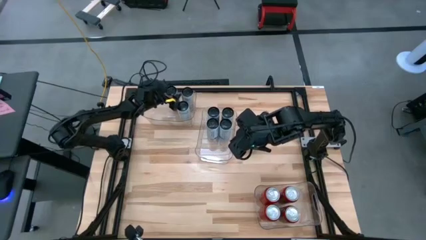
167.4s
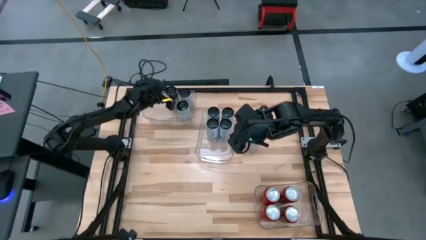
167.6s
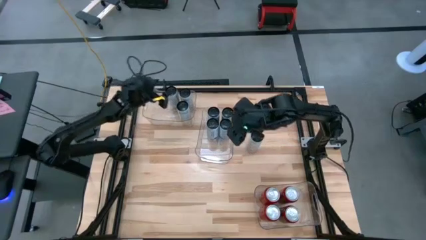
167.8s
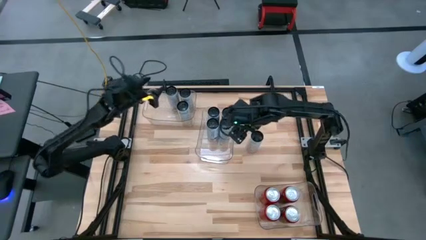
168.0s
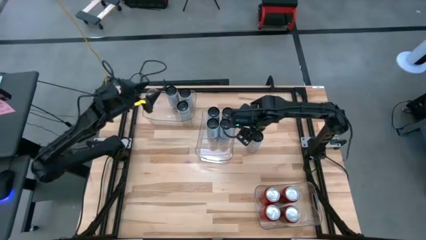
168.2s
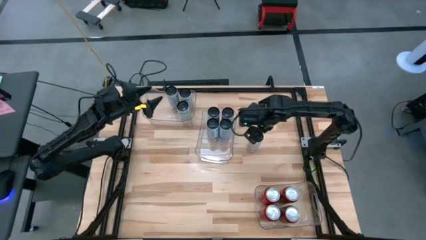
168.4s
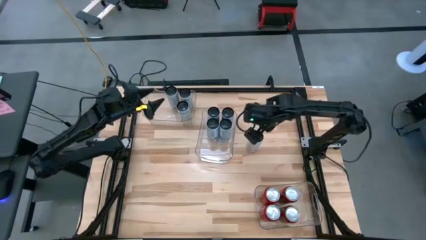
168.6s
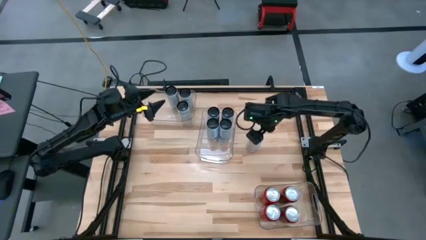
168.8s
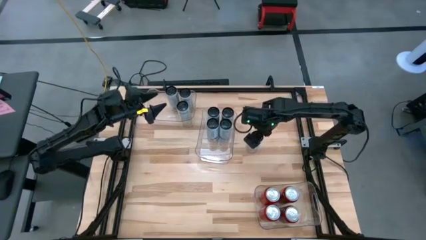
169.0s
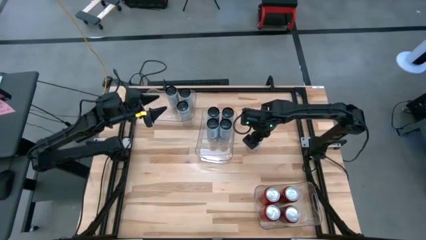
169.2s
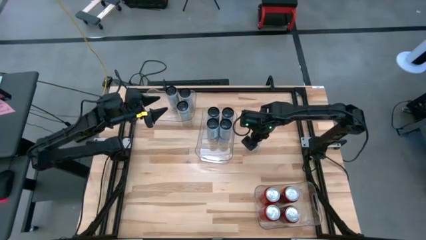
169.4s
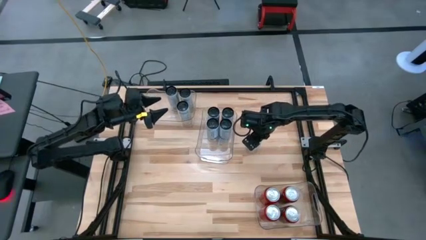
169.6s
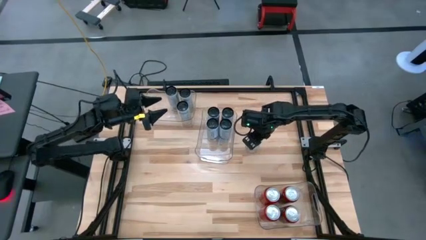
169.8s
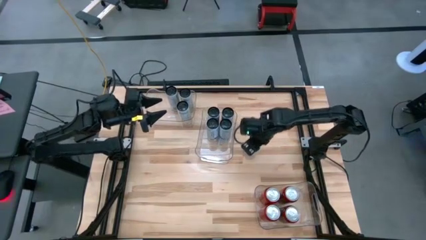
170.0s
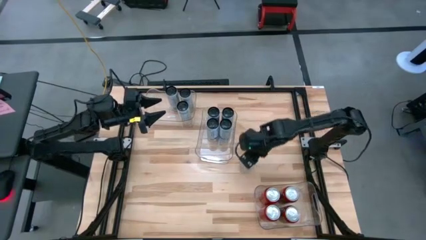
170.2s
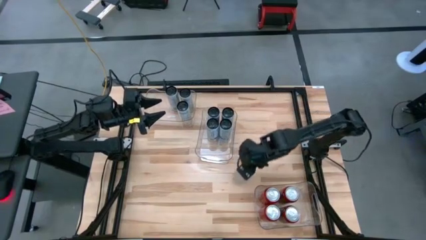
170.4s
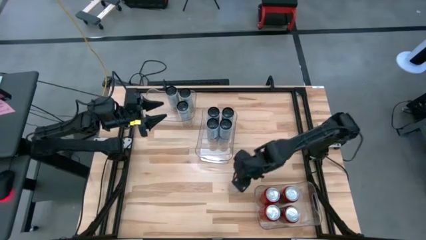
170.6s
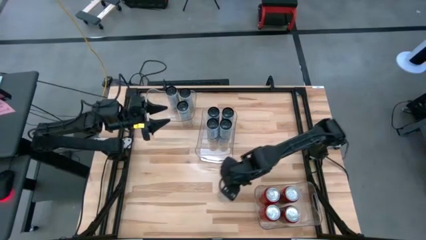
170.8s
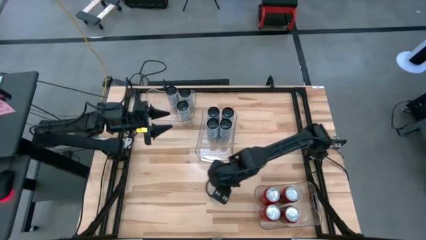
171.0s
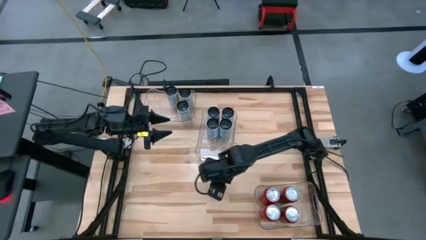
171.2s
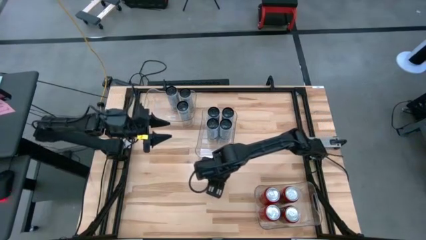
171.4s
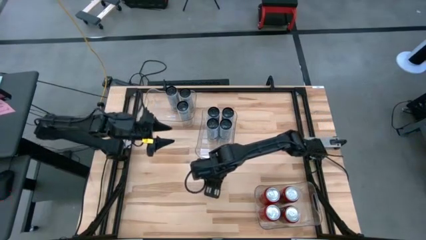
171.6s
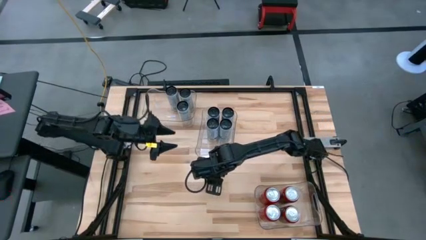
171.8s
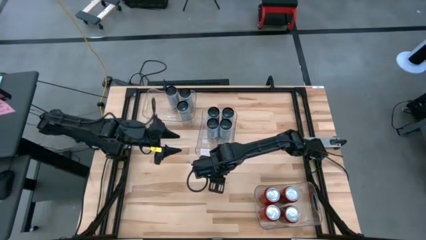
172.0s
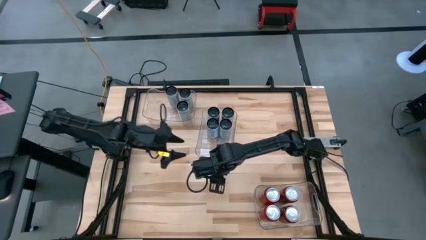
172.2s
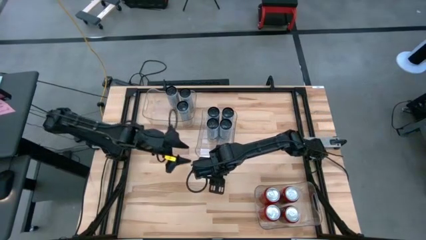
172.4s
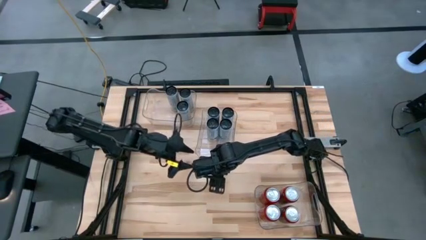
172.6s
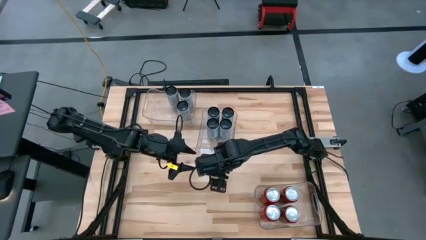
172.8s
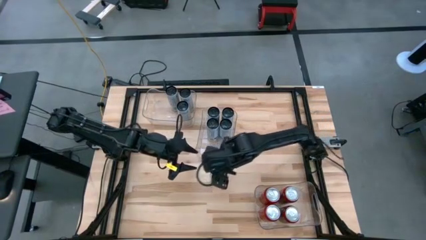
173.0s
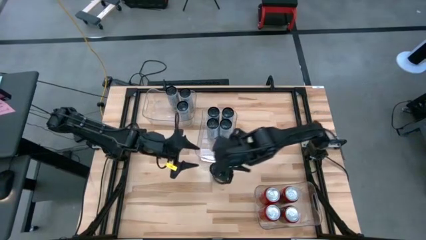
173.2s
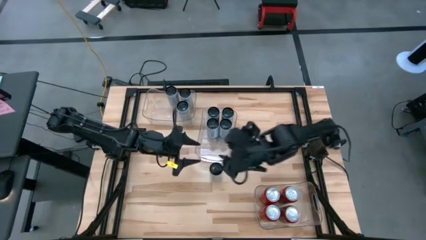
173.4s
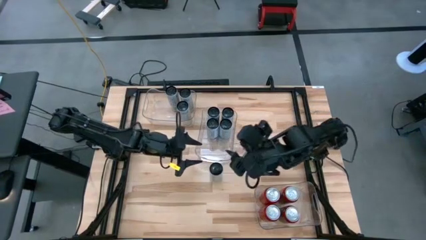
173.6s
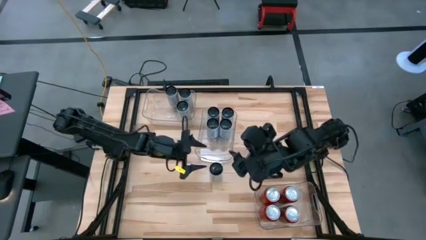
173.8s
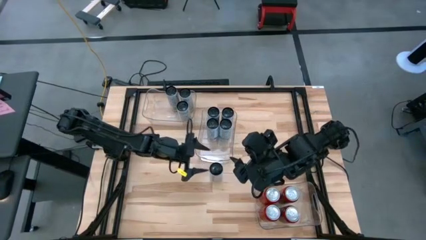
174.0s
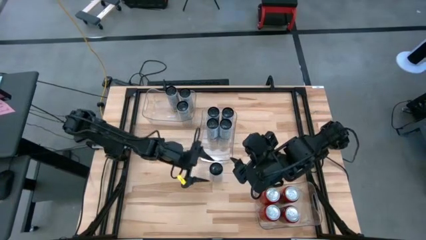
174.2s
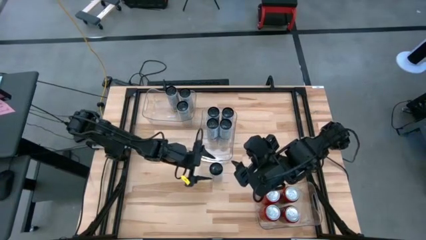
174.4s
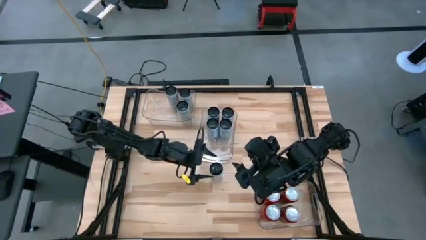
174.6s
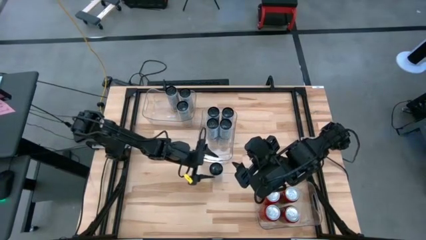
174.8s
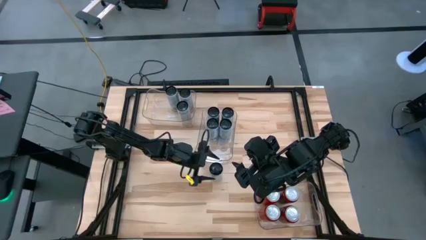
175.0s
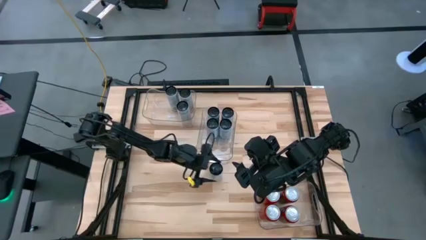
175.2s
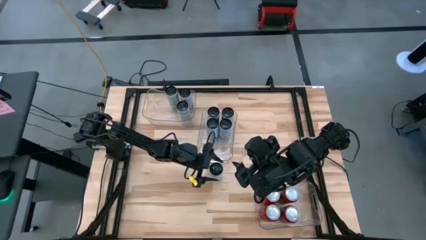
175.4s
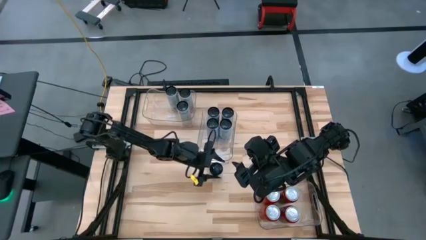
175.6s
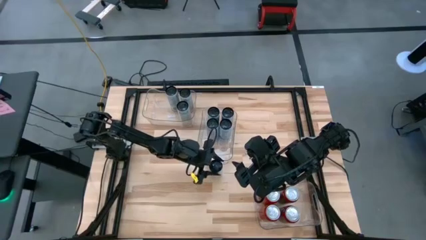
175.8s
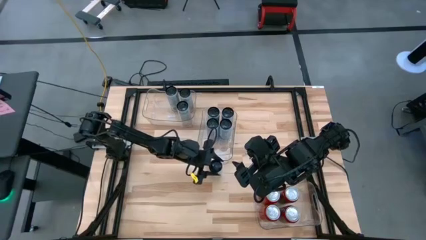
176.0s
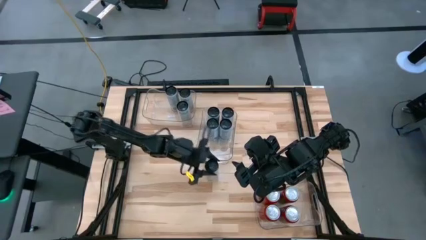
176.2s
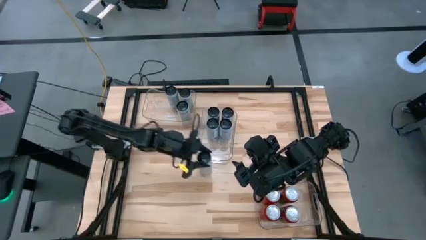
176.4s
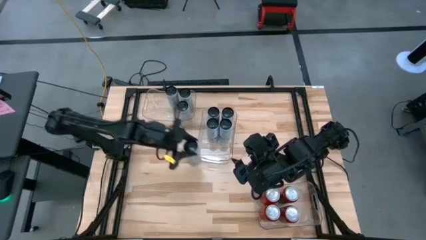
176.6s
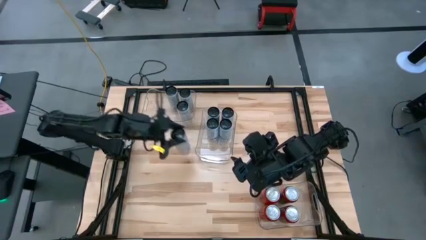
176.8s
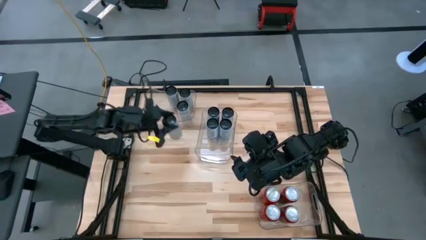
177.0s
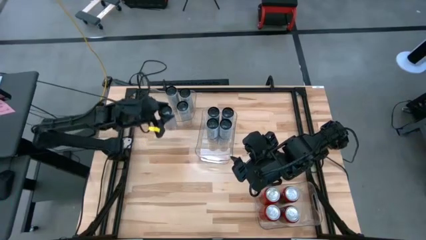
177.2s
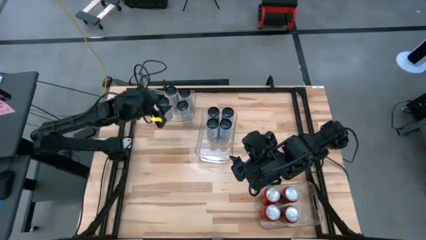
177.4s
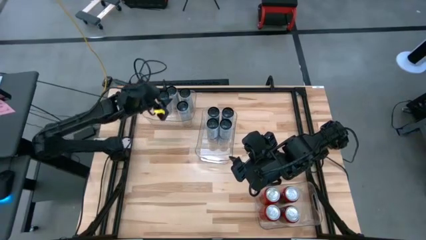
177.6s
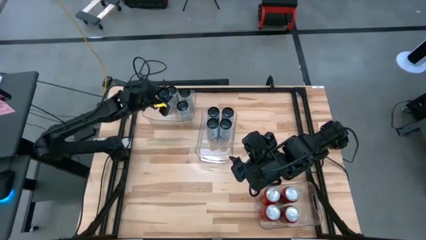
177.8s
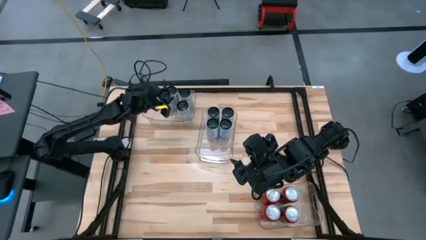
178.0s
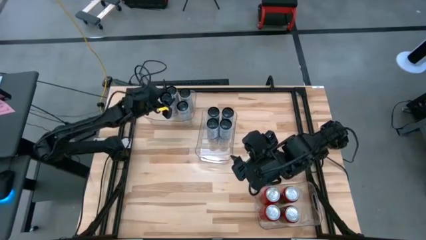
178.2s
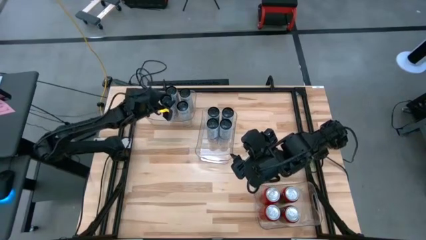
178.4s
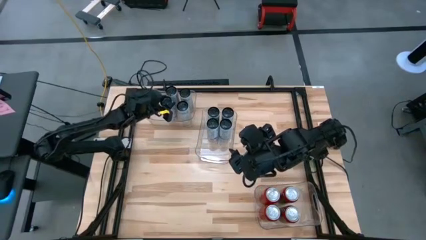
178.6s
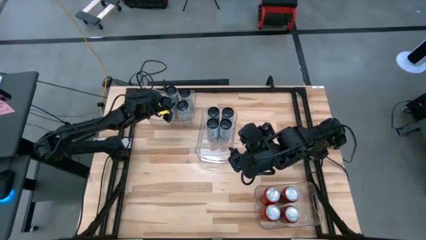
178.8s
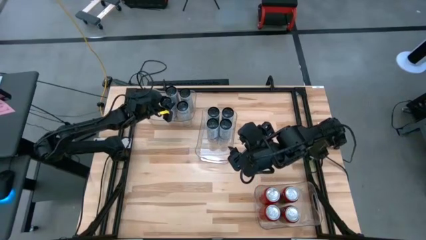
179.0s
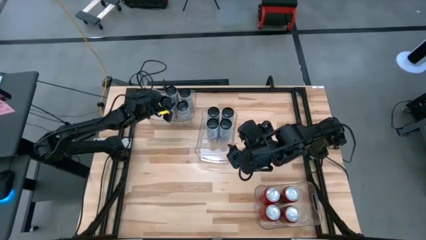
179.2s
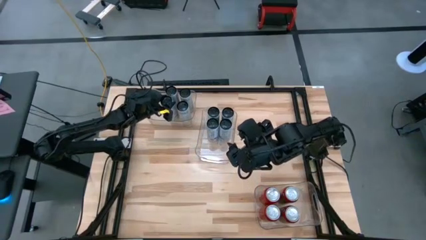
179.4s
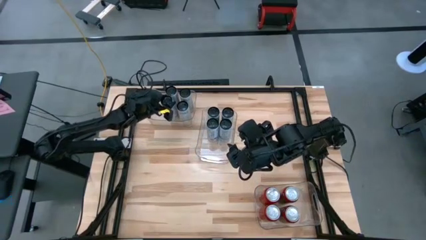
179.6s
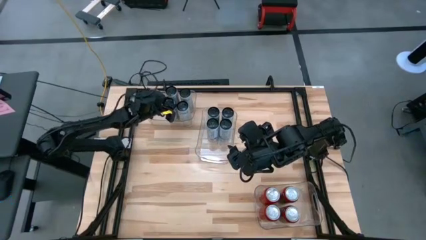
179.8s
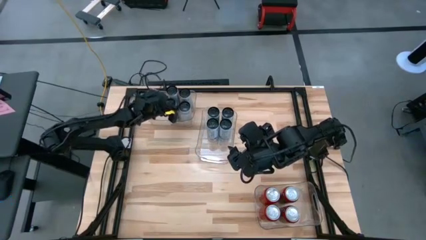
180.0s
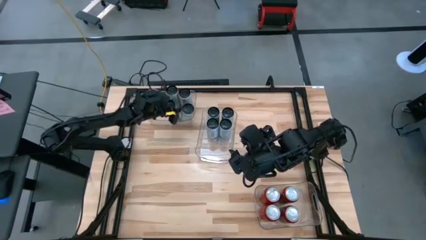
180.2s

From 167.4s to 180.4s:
Task: Sort soda cans
Put the white yellow soda can into the top transparent bin
